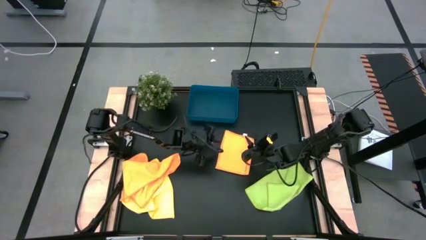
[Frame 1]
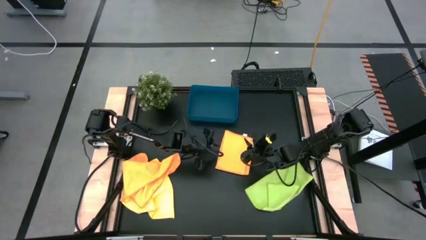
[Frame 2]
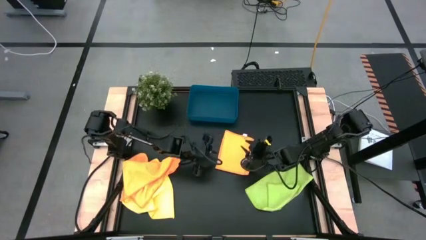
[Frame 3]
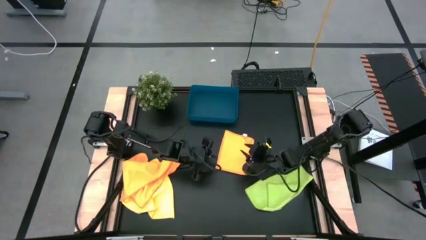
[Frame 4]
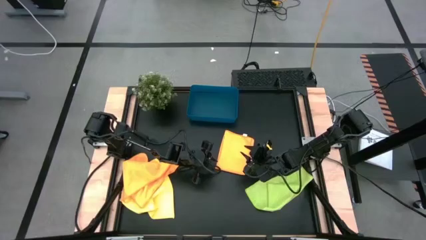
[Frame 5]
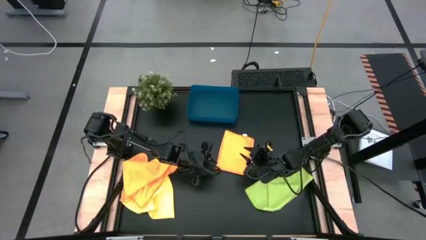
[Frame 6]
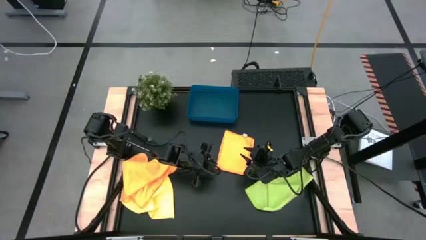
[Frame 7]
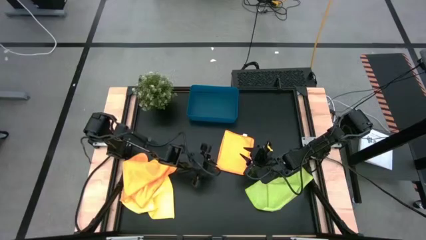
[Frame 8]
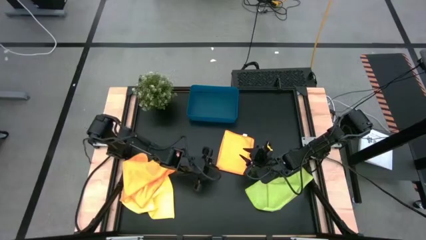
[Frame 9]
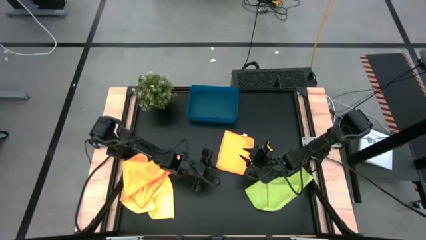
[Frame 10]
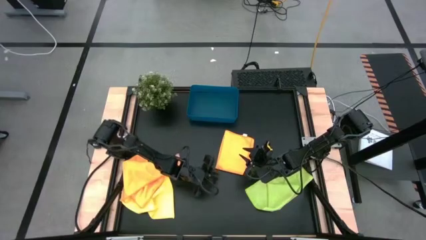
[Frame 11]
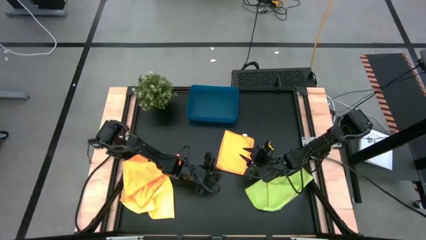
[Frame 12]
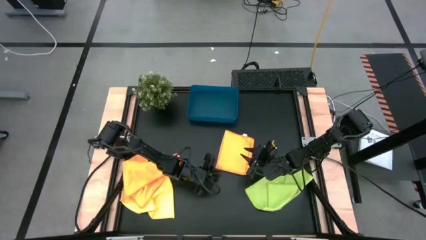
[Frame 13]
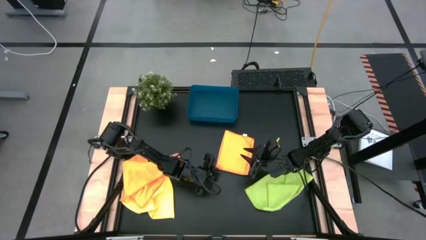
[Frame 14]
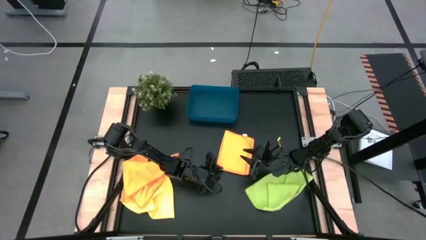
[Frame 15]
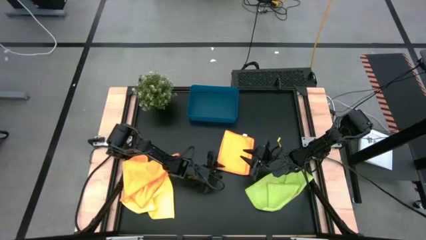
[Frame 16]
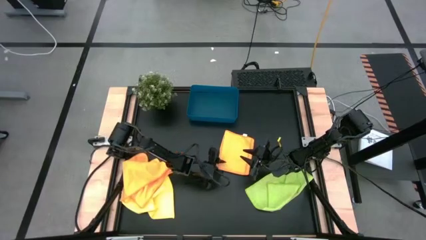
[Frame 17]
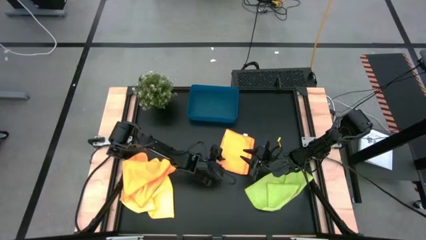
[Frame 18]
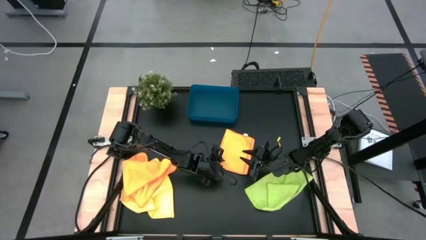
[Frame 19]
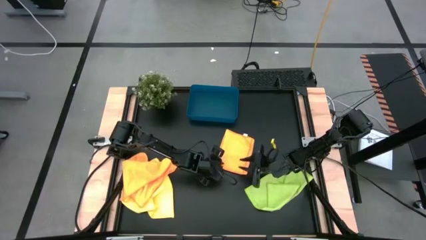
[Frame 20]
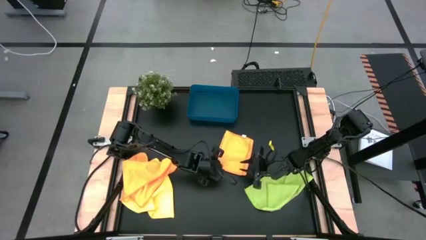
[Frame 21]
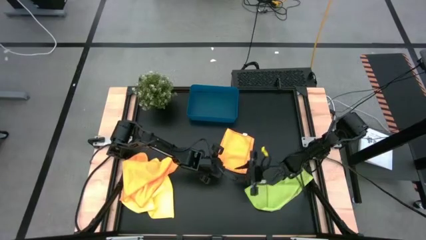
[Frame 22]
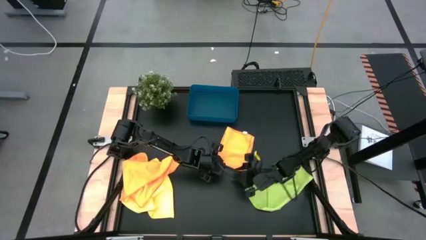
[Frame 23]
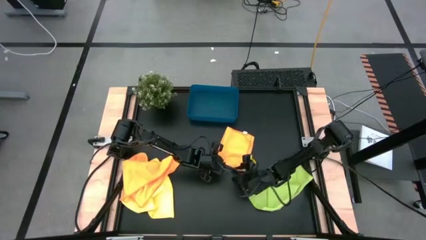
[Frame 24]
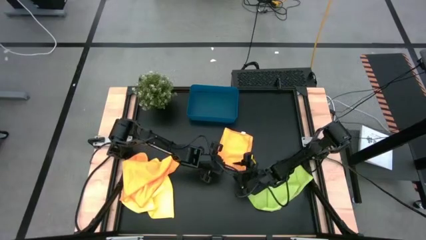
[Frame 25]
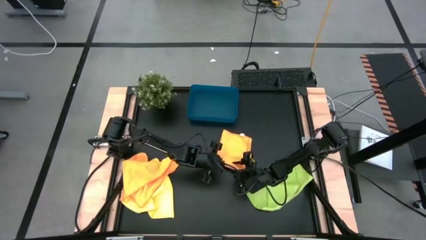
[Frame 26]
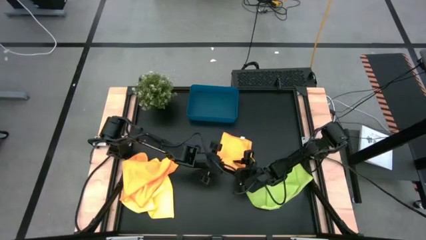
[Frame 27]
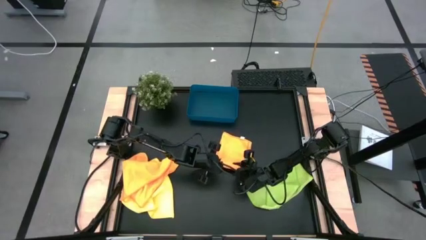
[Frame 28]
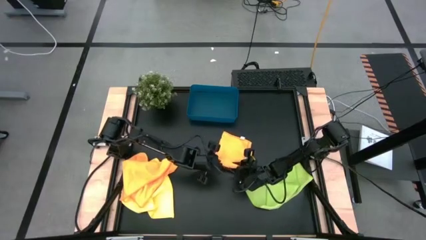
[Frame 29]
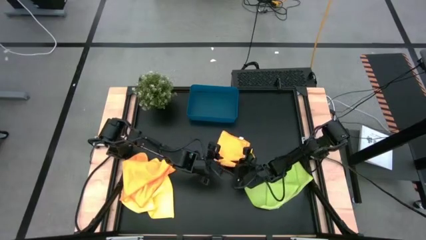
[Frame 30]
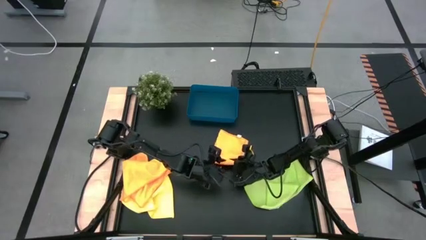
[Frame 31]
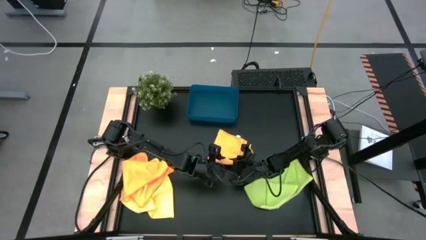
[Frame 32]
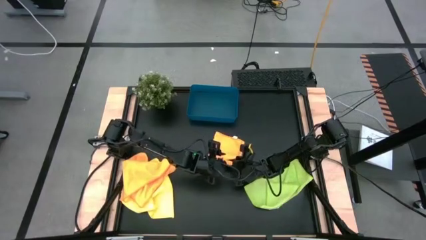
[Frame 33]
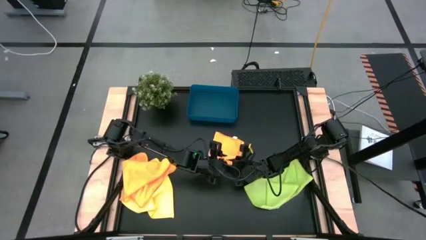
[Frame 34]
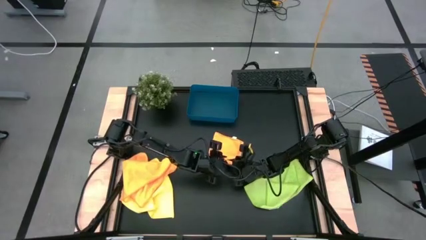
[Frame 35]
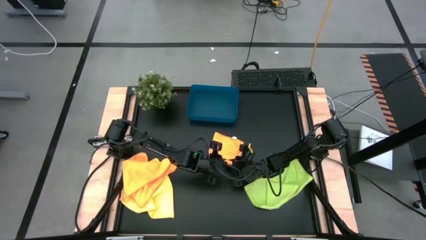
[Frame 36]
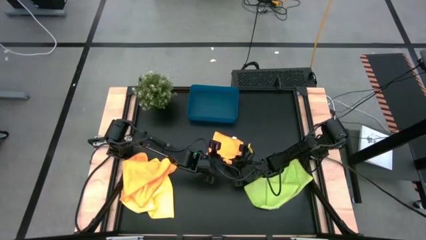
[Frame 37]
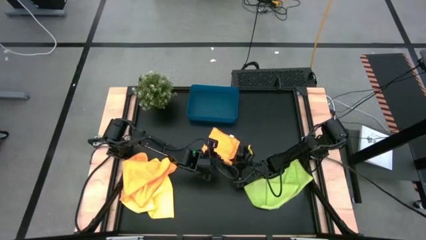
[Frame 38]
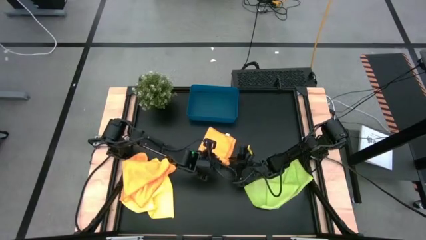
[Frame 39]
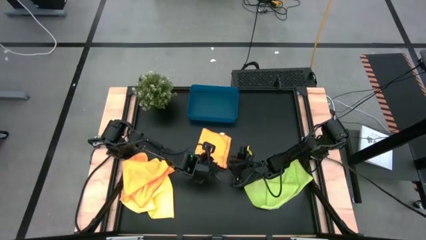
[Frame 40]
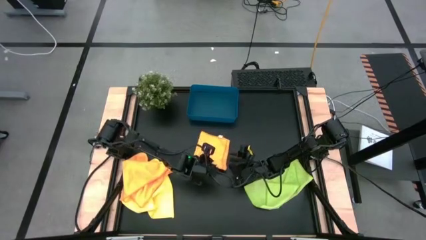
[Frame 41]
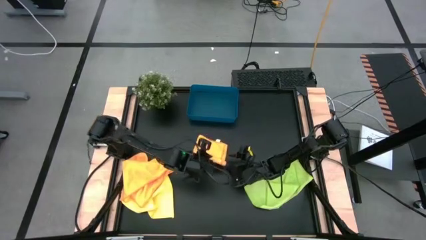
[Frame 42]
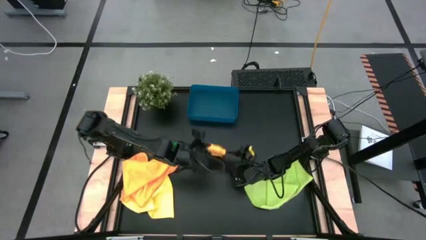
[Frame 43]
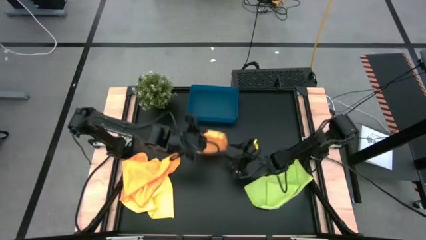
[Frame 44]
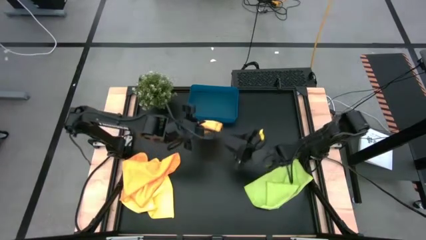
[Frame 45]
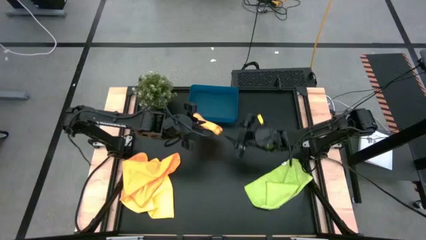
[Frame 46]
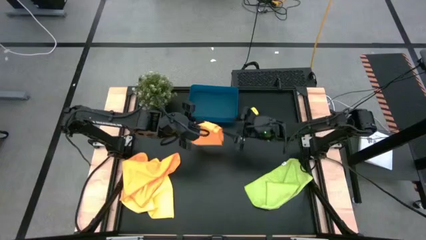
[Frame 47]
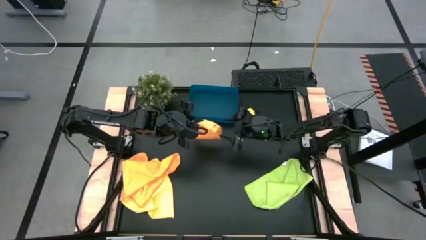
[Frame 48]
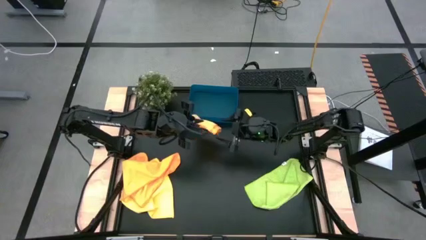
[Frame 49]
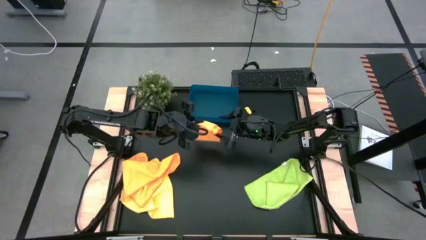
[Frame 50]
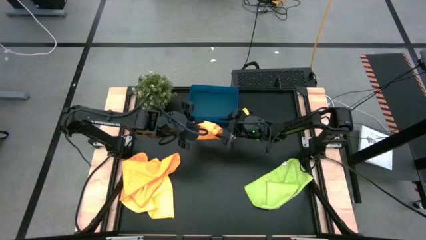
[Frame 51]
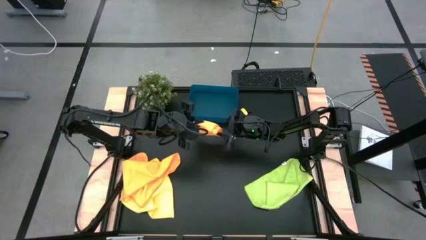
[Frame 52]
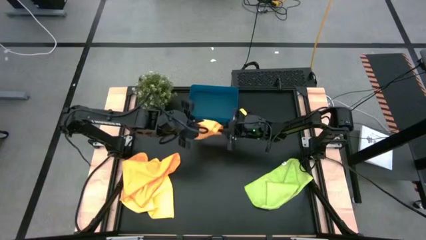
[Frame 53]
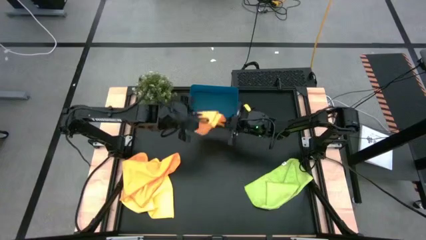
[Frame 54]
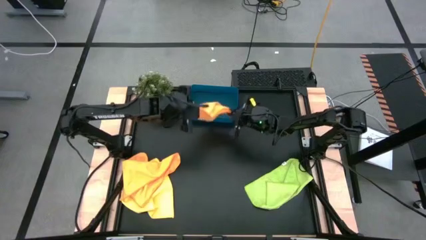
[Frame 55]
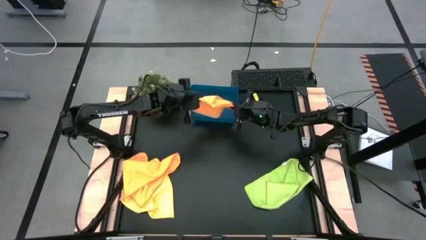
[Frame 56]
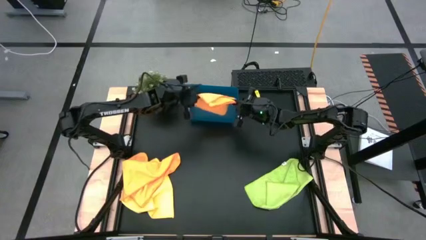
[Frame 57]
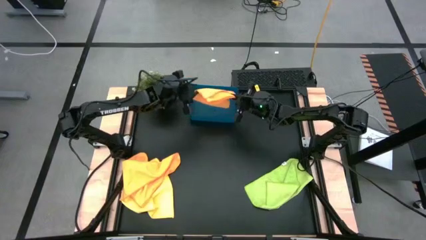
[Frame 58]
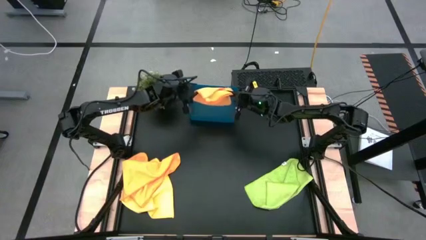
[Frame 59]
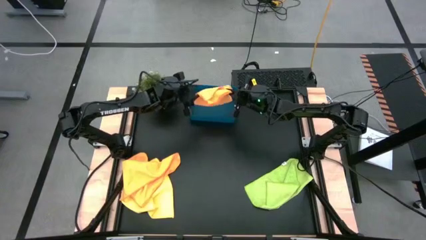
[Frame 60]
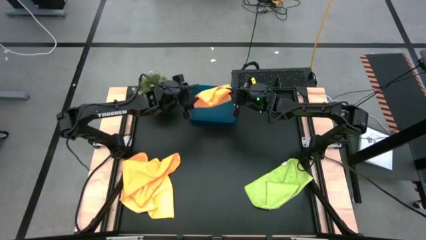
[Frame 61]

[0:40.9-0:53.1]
Task: Fold microfiber towels
Put the right orange microfiber towel into the blue bin

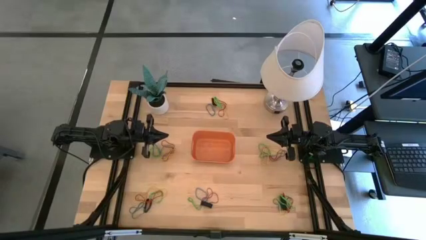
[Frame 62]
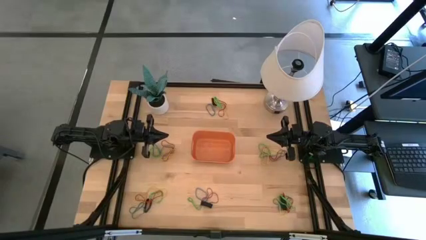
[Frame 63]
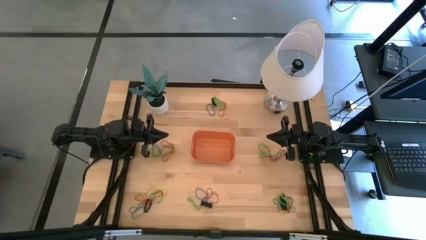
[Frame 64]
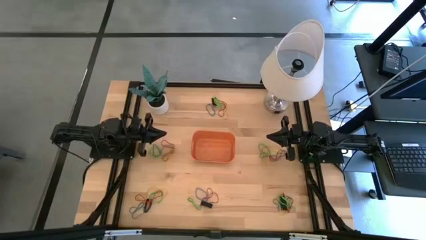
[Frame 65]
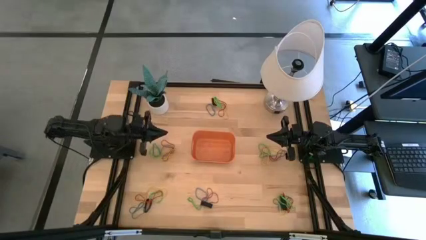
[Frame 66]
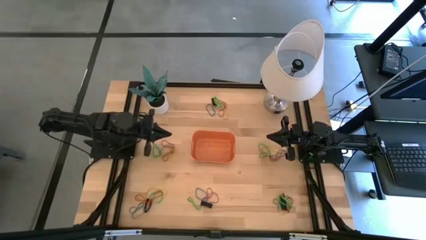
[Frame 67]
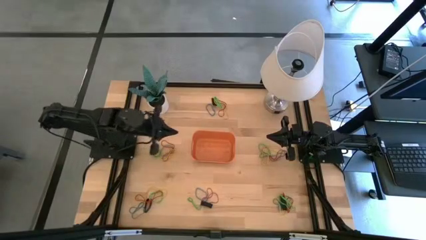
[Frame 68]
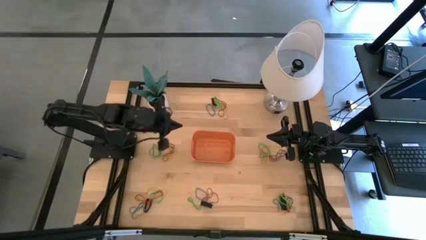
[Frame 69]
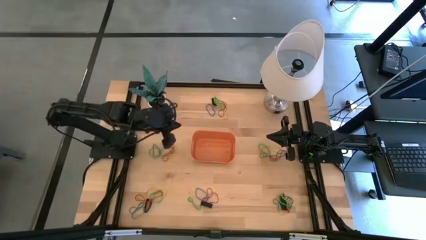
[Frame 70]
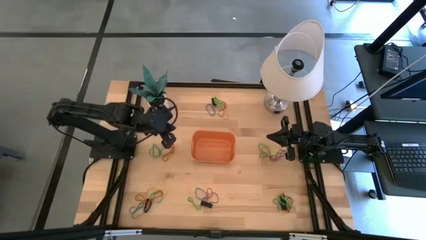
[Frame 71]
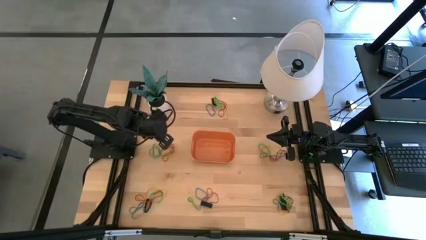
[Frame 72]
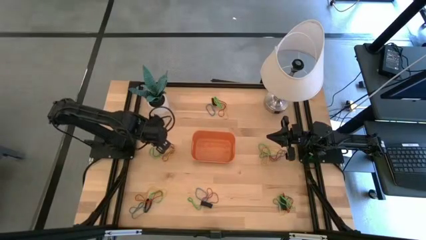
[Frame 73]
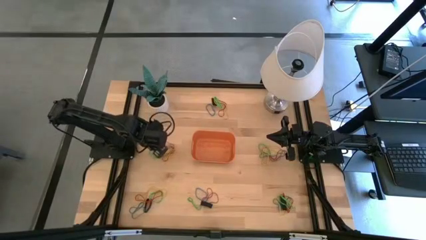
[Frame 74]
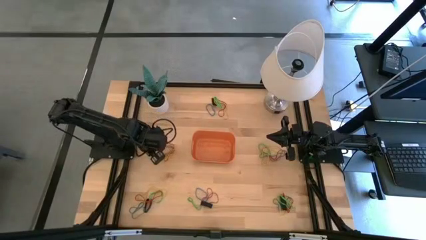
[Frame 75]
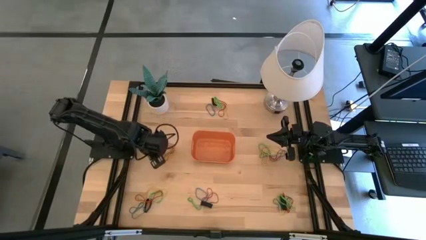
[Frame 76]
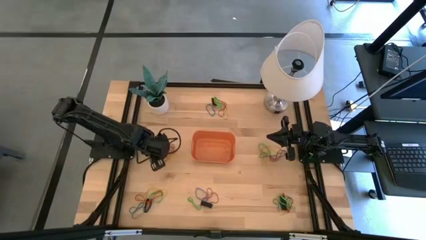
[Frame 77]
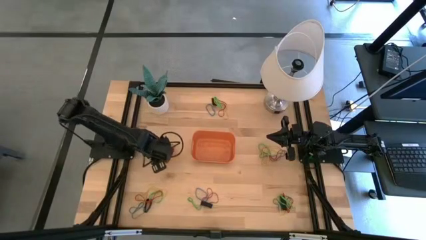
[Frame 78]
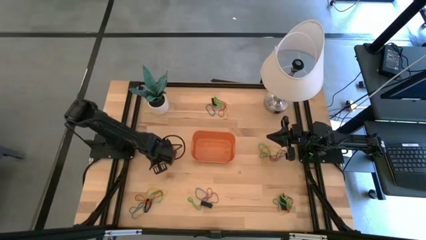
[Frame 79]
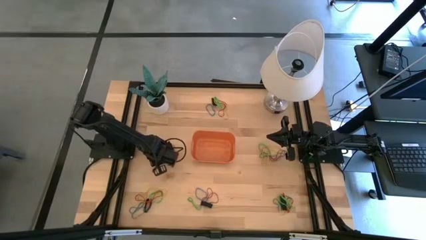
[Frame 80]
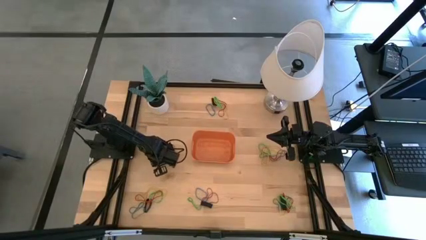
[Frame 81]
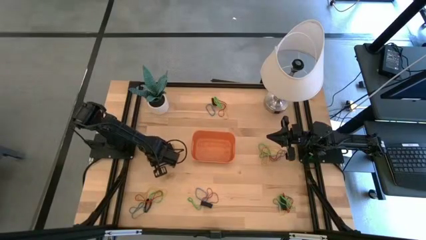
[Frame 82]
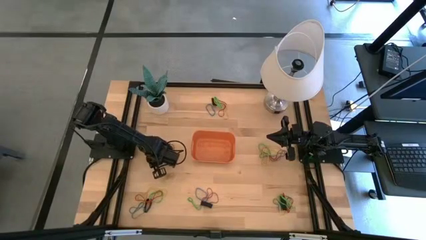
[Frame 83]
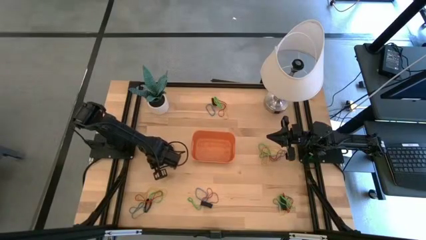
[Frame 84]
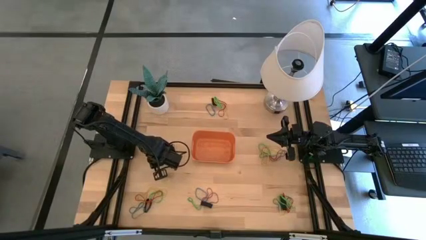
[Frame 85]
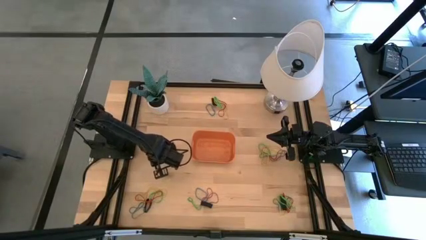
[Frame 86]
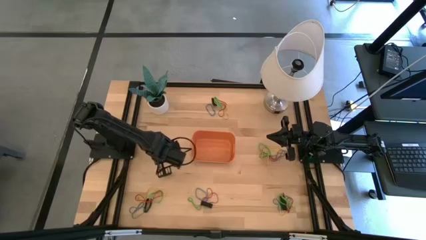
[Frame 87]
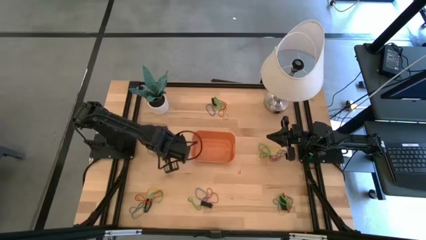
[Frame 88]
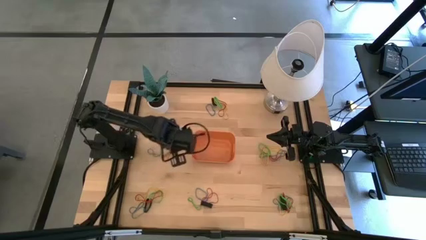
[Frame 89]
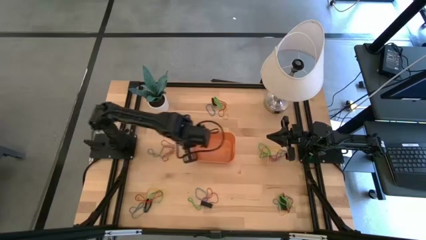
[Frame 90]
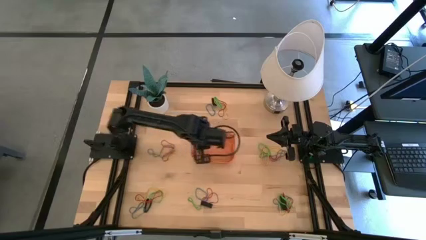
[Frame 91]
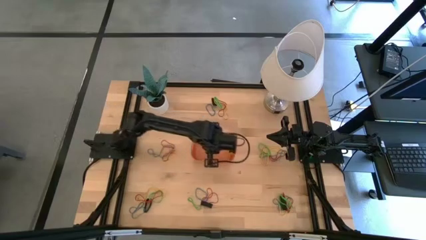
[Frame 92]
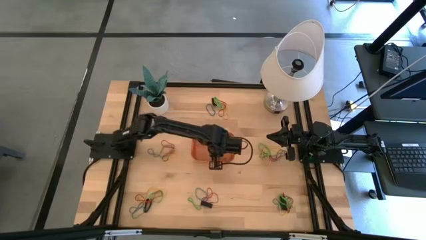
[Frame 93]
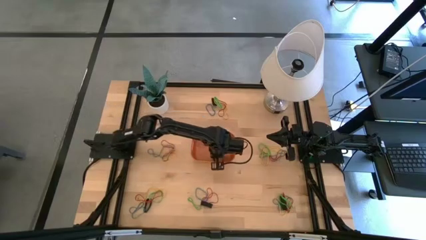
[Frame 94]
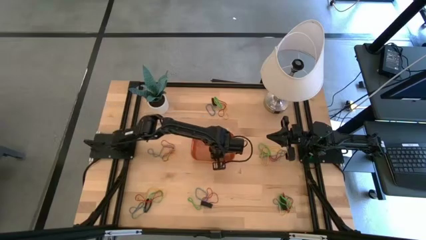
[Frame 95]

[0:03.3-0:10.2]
Task: Pick and place rubber bands into bin
Put the green rubber band into the orange bin
